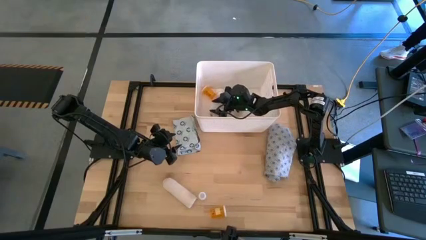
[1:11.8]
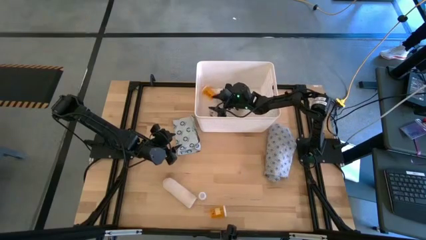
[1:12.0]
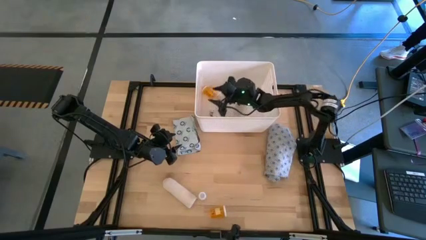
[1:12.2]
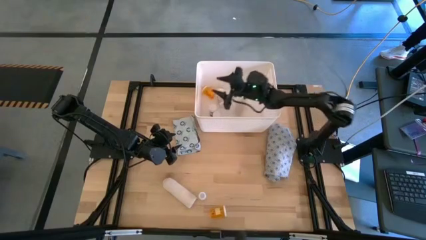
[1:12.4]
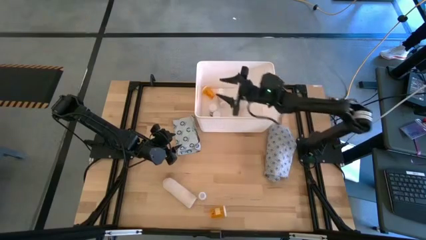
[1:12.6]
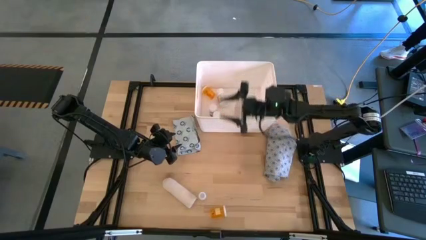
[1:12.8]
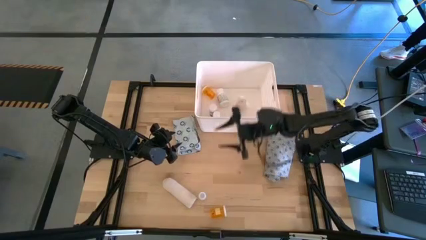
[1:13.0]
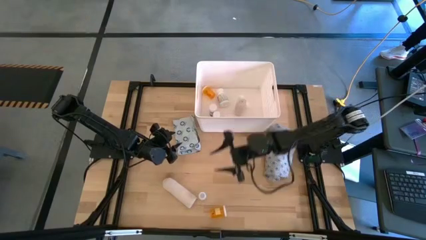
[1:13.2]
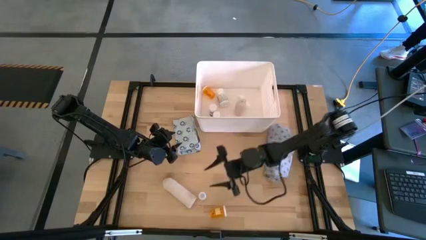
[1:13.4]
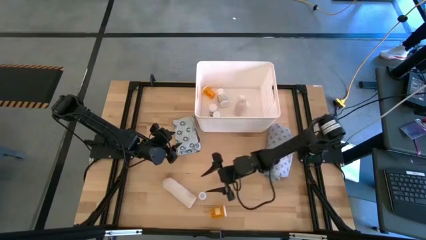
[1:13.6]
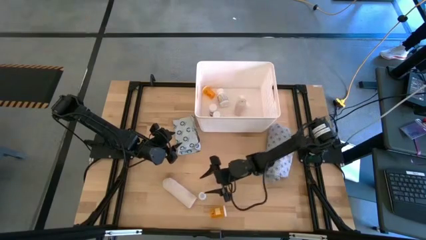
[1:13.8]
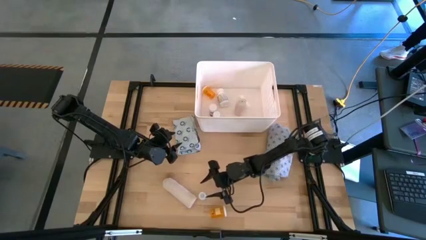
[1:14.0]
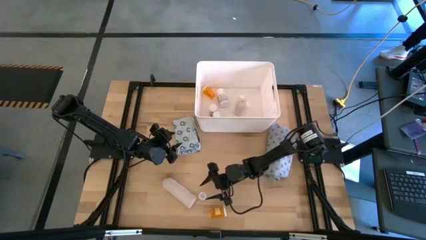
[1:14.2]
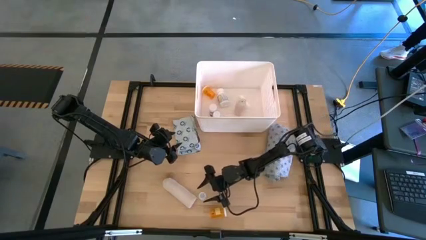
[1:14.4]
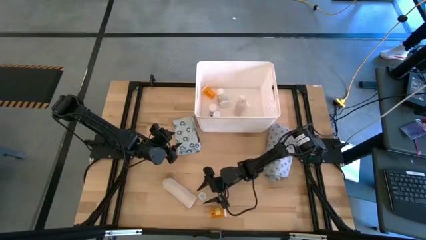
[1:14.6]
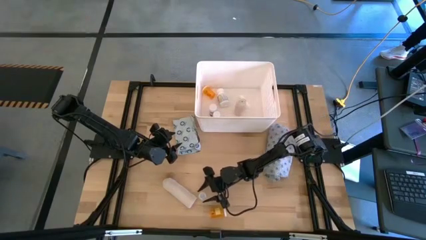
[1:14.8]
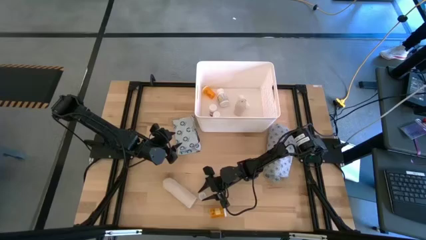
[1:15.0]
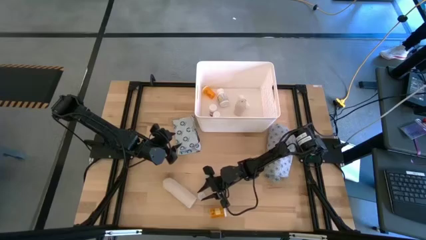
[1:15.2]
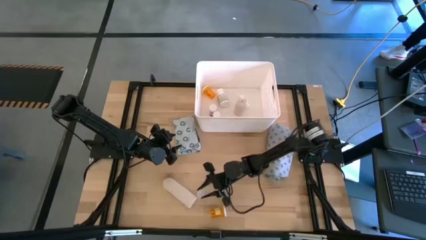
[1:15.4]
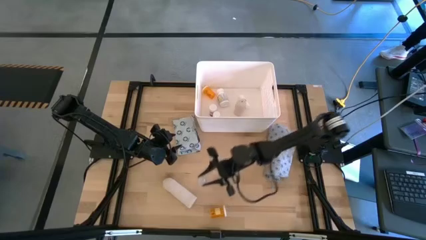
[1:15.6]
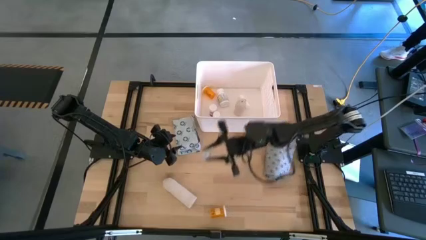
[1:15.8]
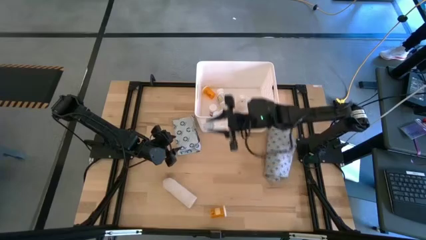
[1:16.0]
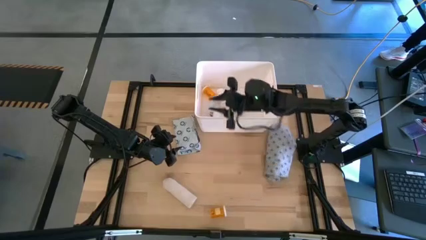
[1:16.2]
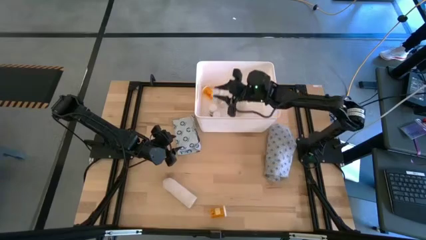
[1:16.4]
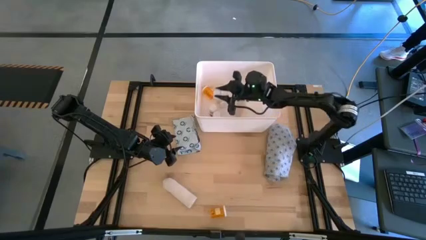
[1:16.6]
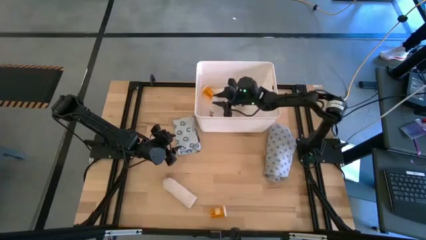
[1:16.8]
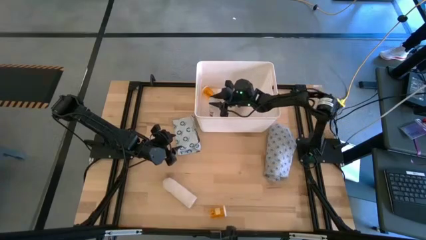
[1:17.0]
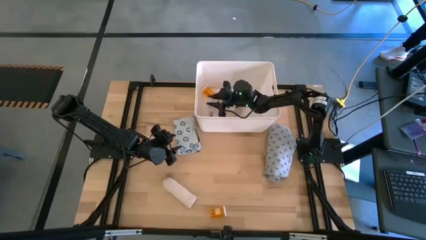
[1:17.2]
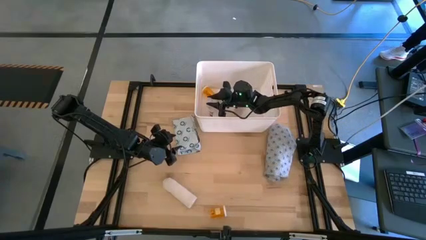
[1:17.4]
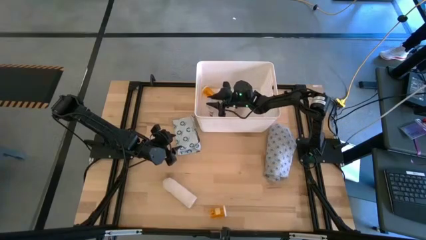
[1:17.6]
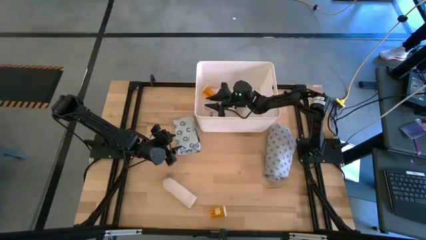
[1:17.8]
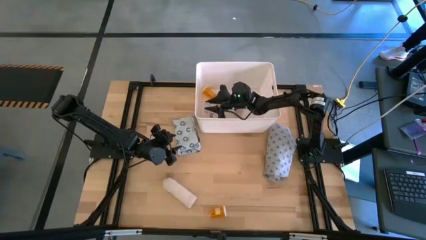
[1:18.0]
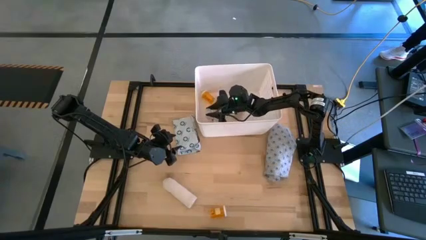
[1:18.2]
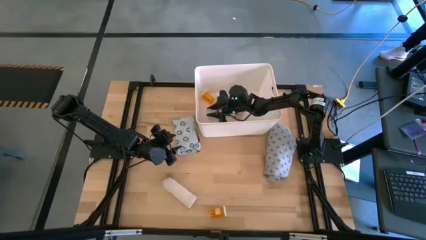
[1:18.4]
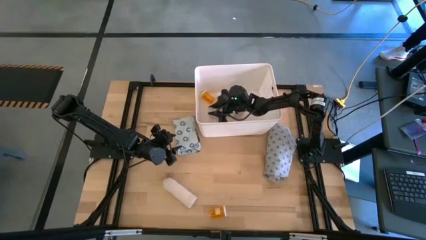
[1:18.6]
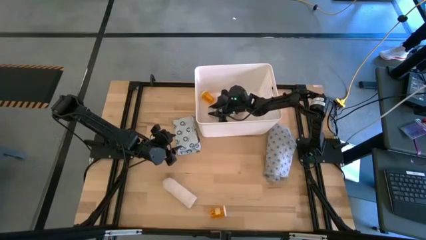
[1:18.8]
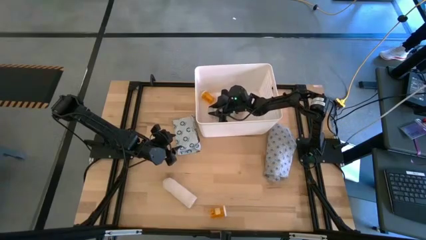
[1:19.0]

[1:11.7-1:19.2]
Task: Pick & place medical supplies in basket/bin
Put the transparent pill bottle into the white bin

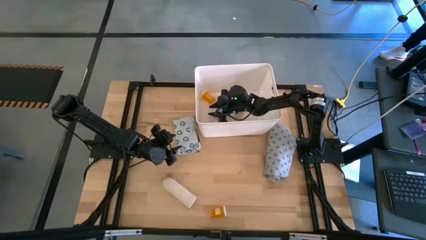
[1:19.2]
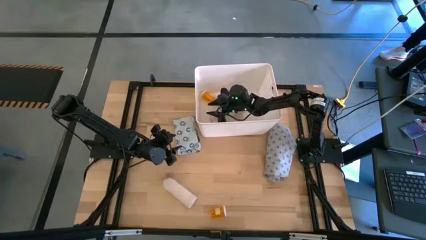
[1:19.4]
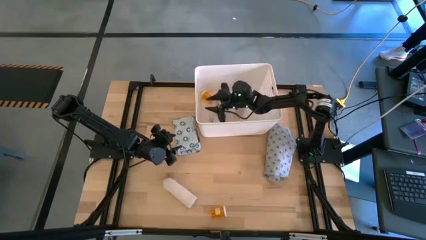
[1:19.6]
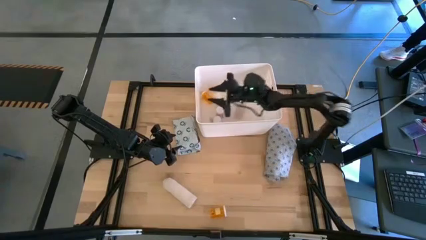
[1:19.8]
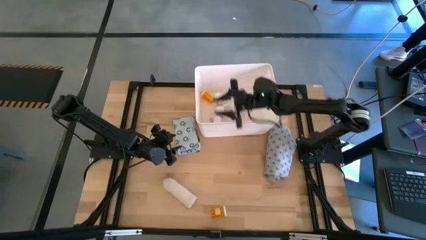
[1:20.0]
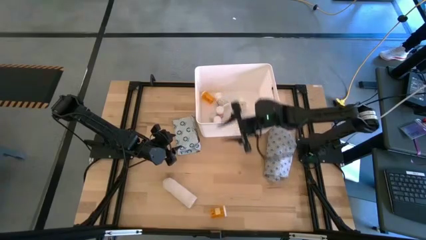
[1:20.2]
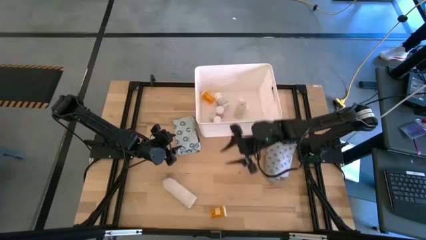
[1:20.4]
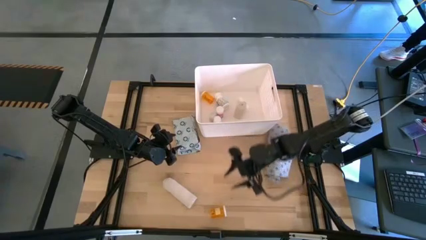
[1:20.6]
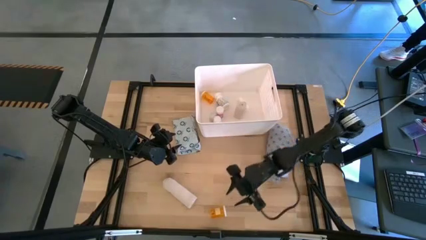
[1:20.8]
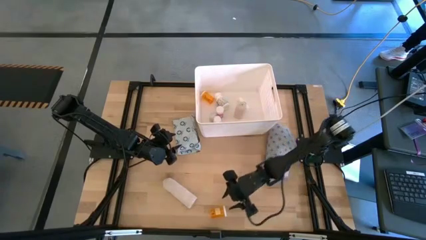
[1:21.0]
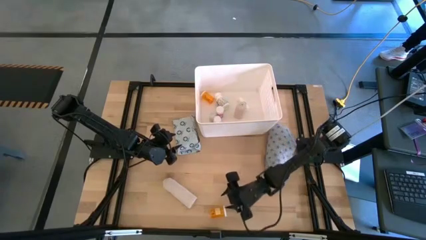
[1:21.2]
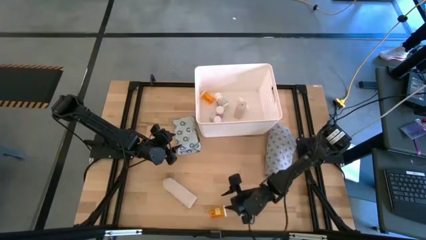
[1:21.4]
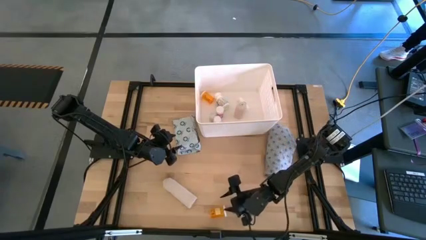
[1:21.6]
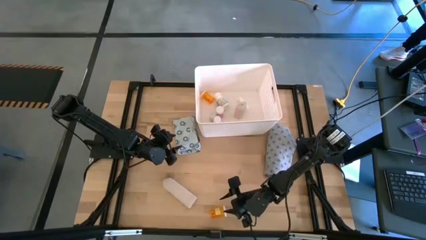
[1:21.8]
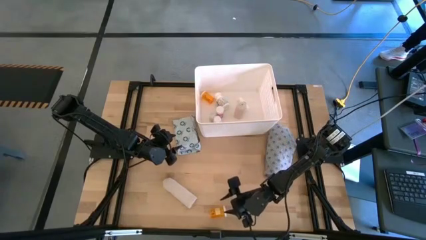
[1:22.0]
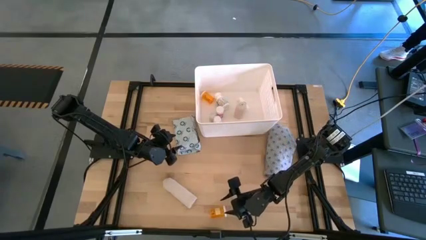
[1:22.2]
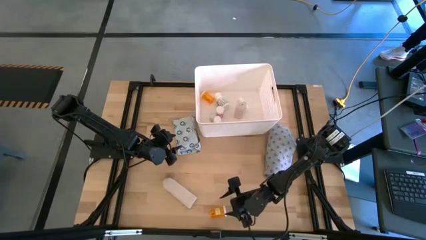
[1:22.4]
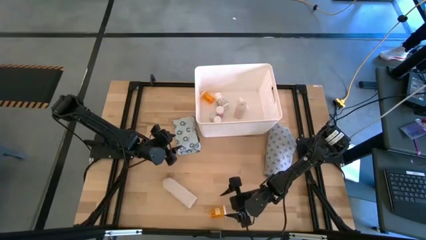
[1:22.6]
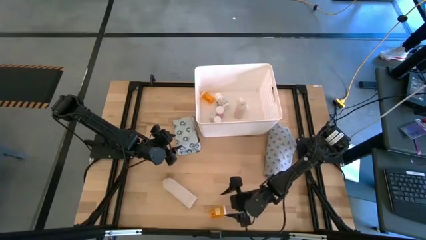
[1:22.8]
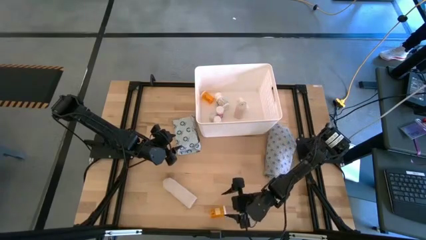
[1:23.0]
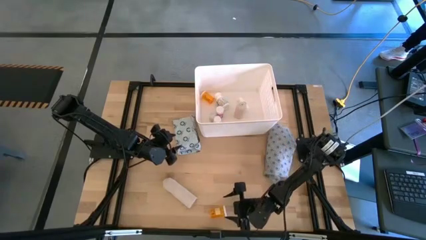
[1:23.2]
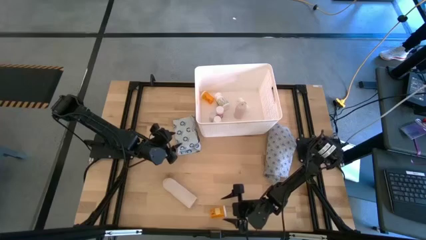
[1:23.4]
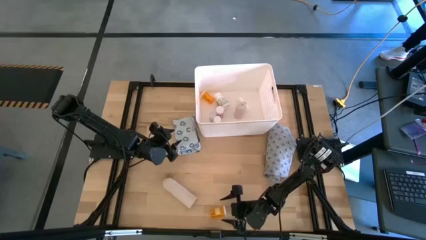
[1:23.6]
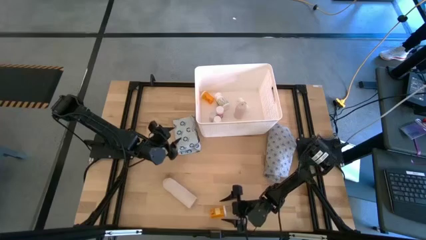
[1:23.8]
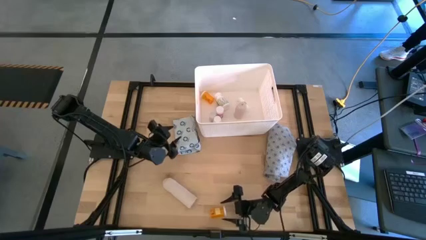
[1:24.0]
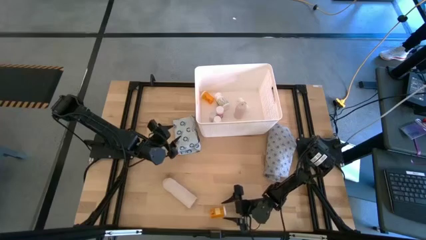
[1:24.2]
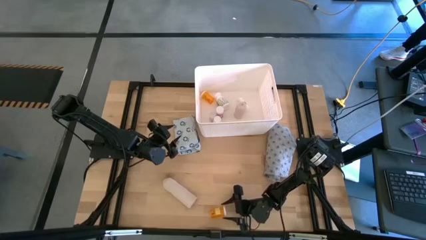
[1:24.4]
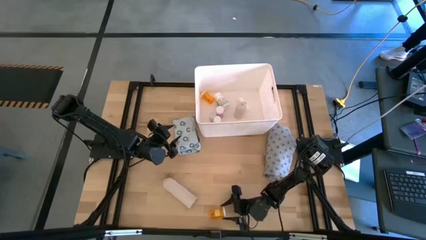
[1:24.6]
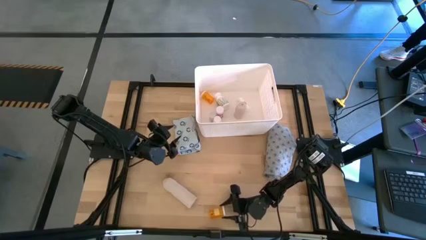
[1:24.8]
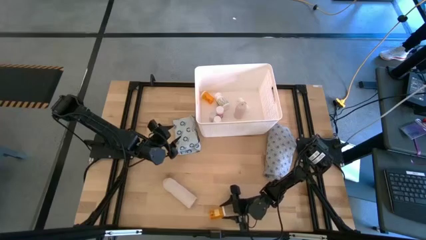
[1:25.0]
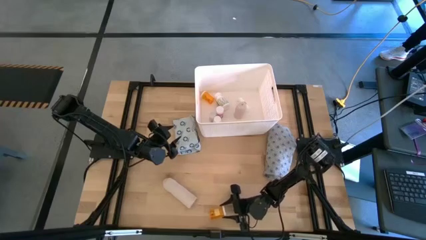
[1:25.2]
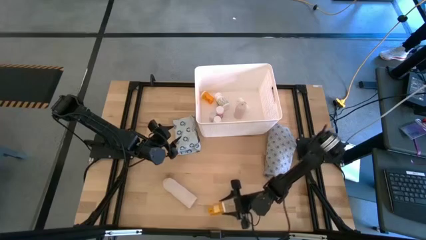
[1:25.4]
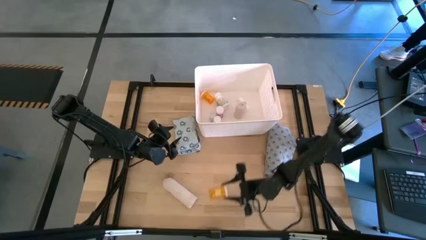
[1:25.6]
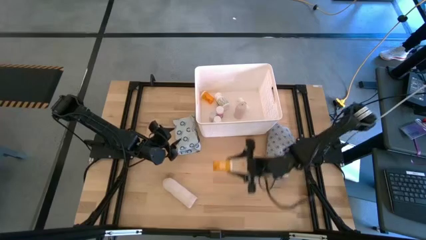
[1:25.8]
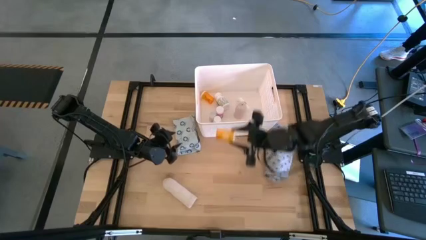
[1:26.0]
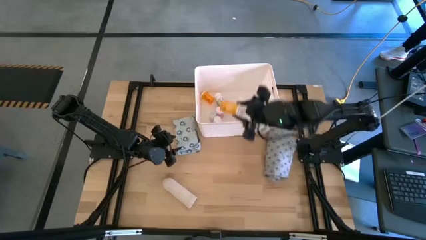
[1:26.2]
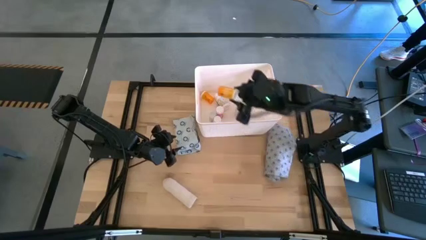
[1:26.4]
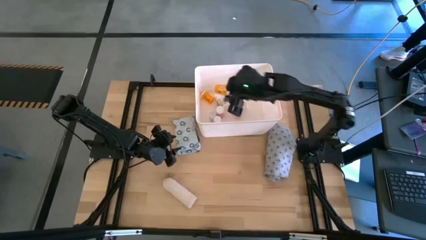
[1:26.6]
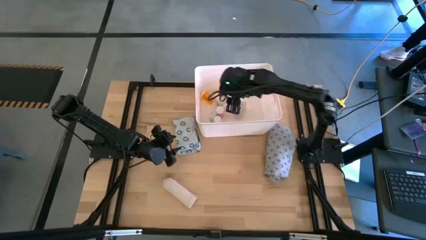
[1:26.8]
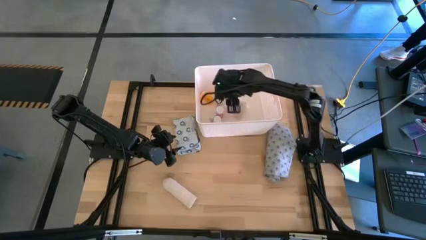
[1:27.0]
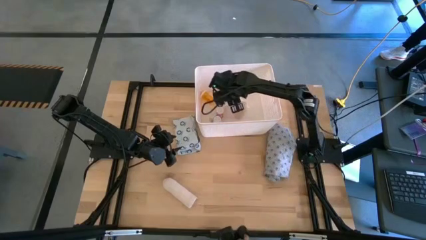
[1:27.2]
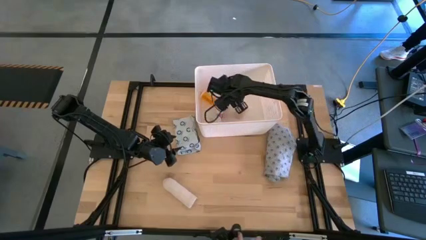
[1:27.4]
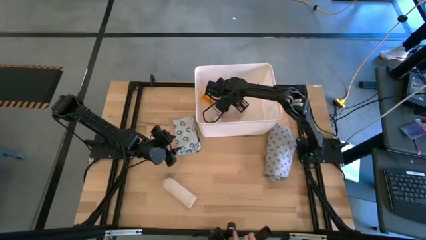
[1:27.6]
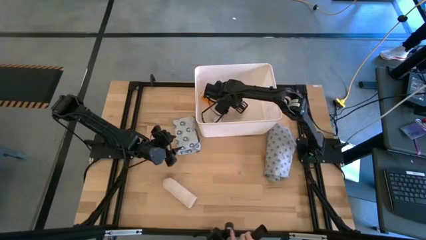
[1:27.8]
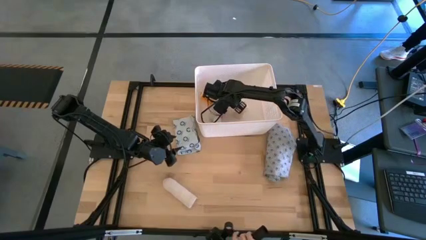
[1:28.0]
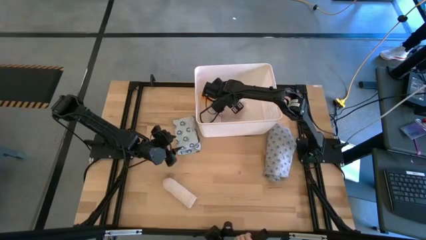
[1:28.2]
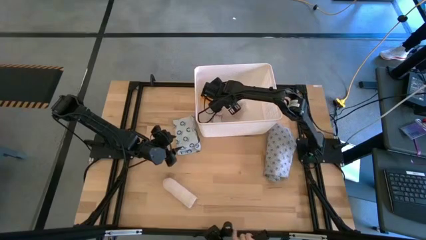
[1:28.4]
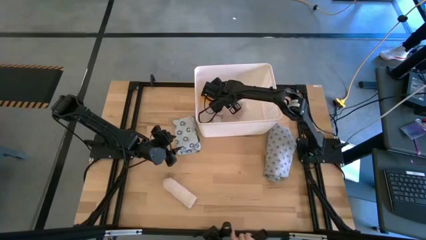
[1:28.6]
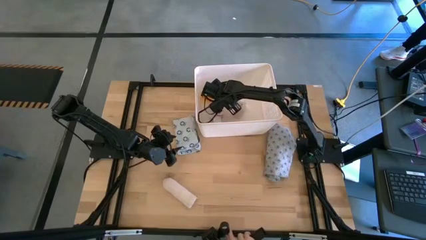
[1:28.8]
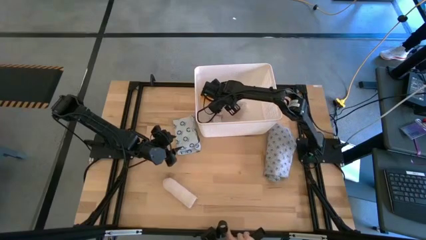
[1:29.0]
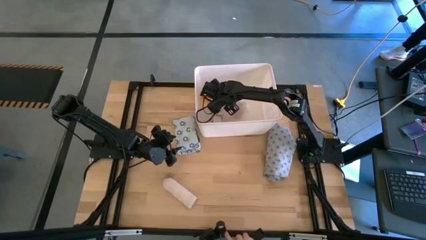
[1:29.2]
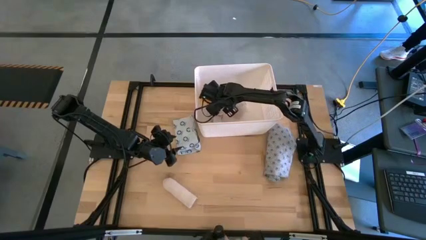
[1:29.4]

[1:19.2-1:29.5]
Put the orange pill bottle into the white bin
